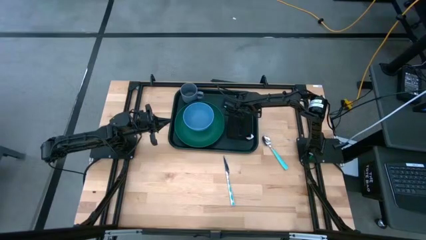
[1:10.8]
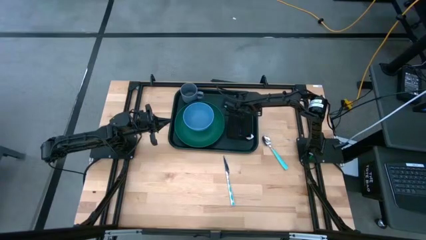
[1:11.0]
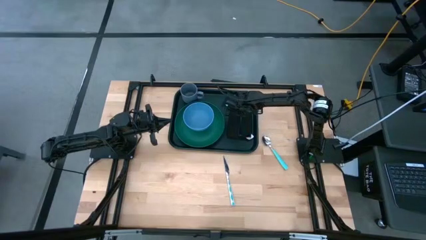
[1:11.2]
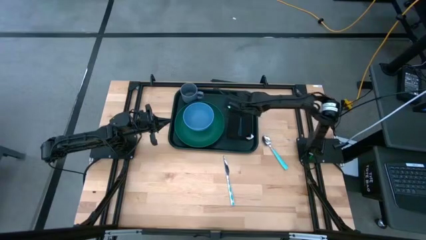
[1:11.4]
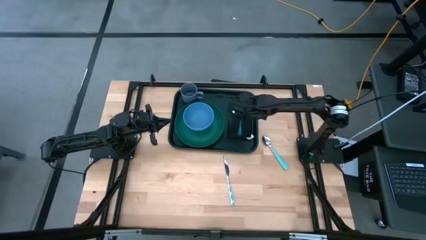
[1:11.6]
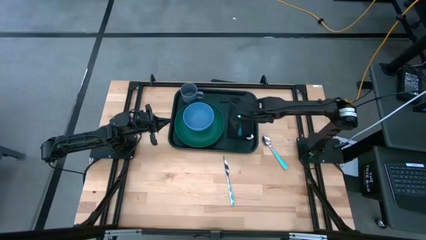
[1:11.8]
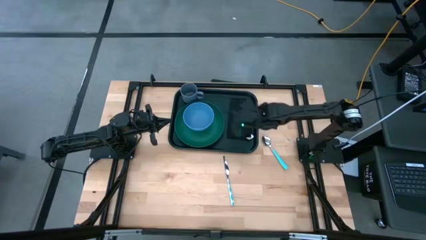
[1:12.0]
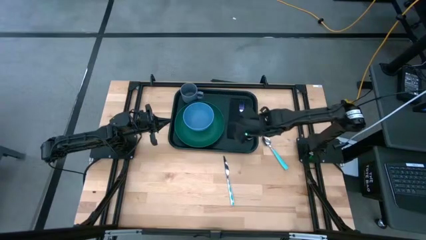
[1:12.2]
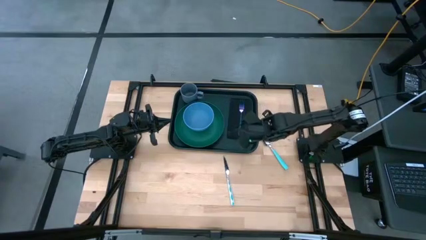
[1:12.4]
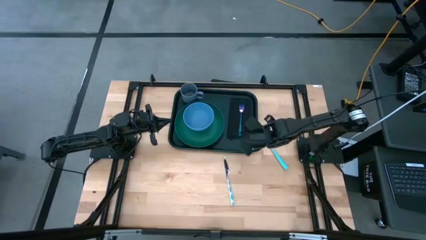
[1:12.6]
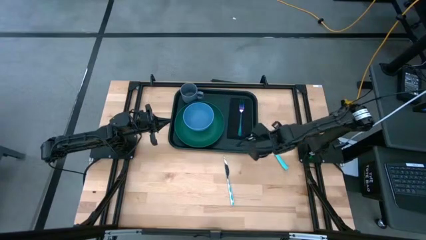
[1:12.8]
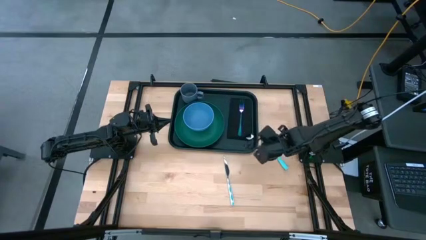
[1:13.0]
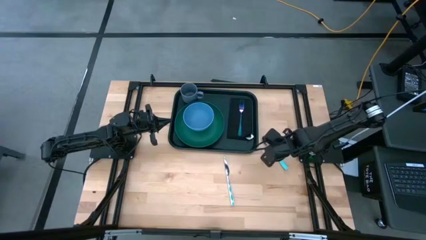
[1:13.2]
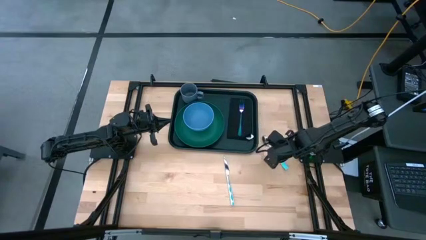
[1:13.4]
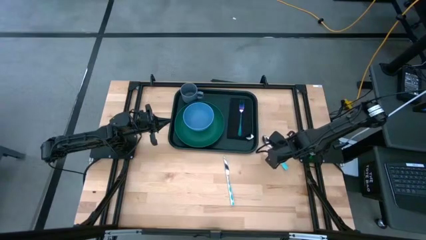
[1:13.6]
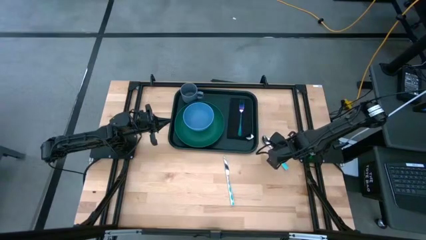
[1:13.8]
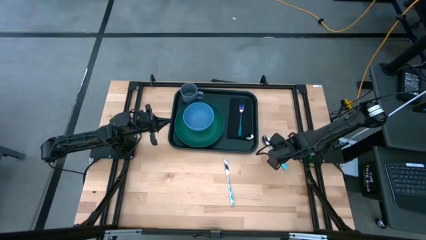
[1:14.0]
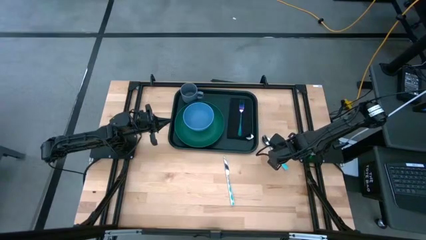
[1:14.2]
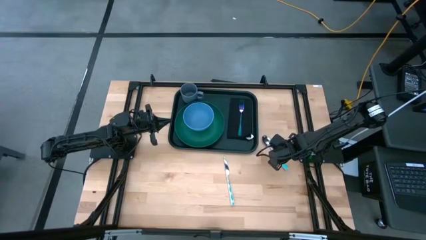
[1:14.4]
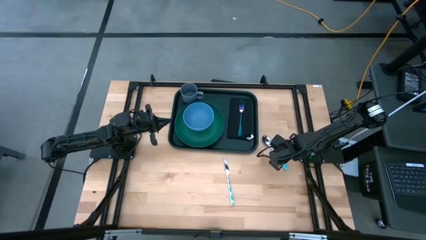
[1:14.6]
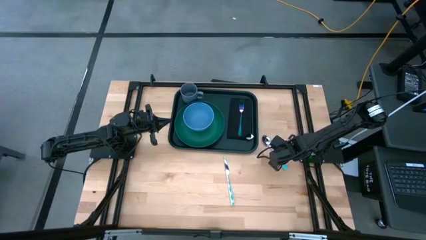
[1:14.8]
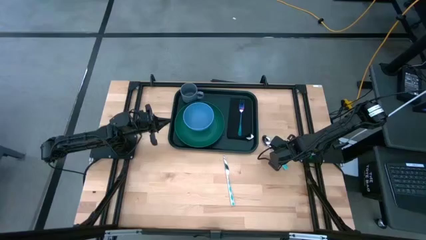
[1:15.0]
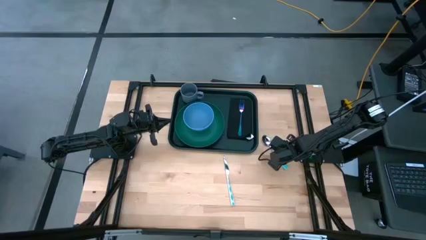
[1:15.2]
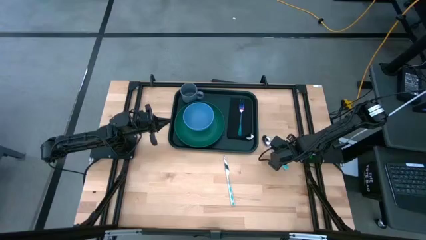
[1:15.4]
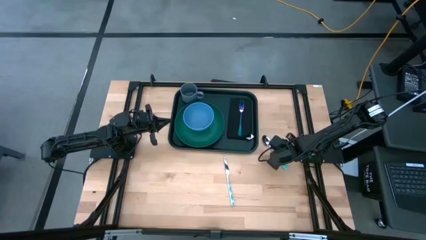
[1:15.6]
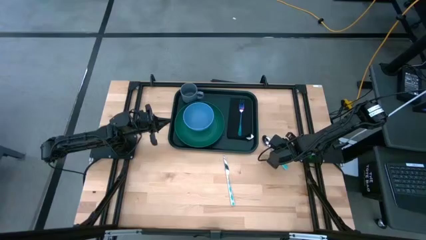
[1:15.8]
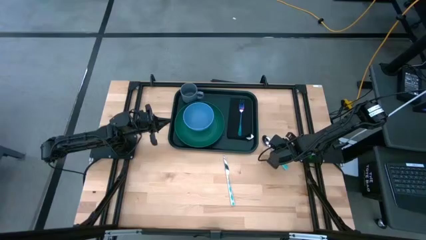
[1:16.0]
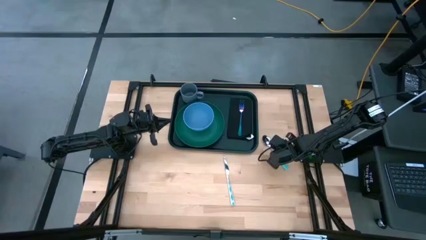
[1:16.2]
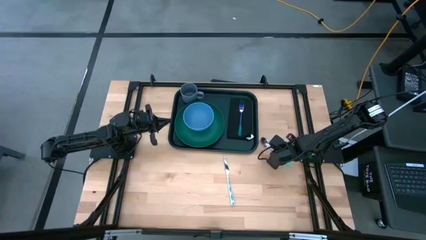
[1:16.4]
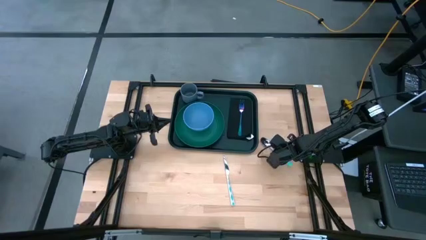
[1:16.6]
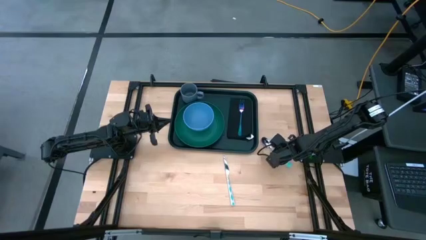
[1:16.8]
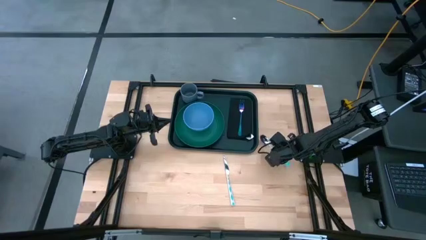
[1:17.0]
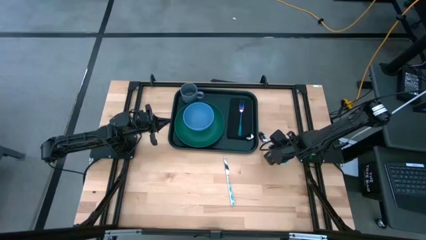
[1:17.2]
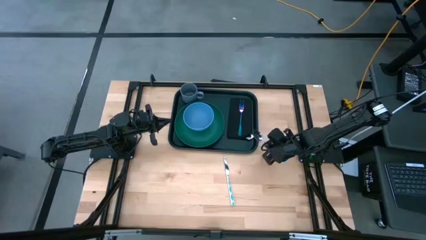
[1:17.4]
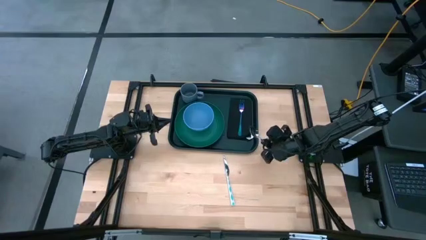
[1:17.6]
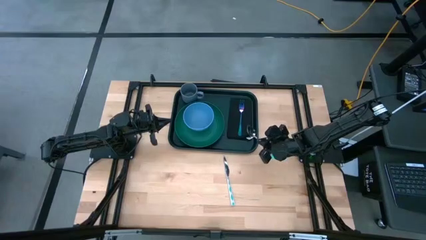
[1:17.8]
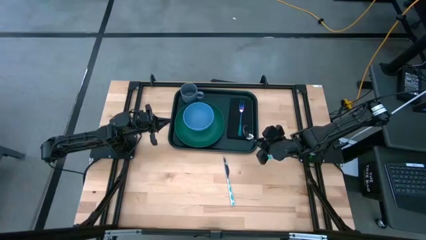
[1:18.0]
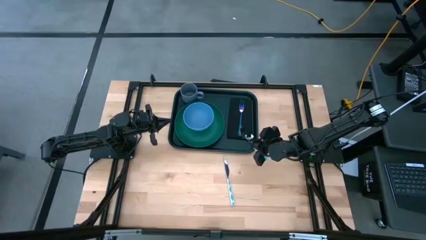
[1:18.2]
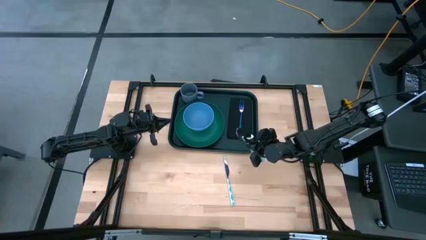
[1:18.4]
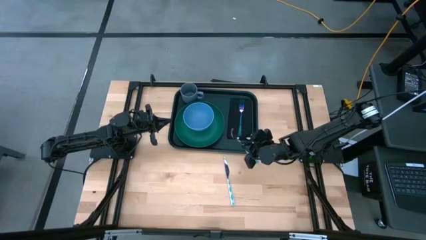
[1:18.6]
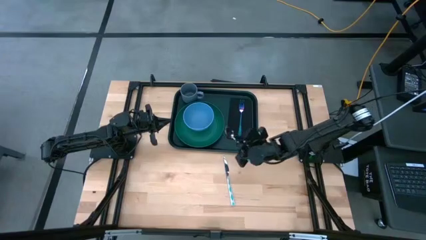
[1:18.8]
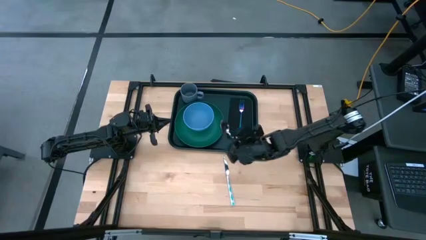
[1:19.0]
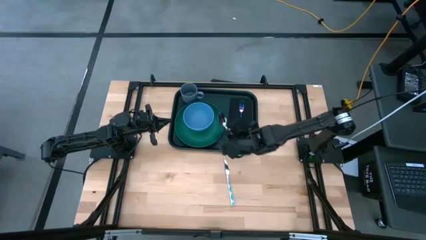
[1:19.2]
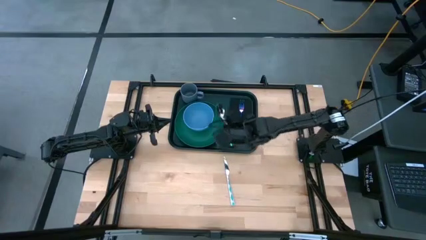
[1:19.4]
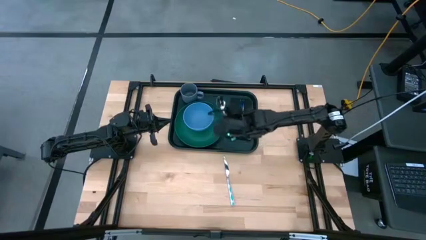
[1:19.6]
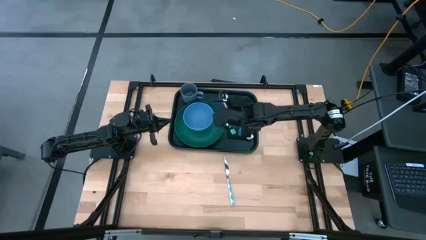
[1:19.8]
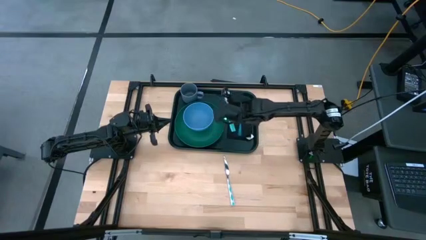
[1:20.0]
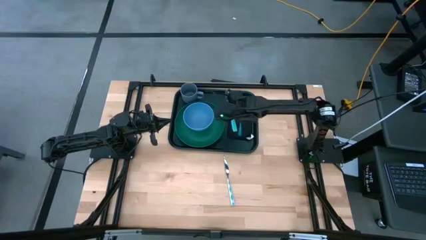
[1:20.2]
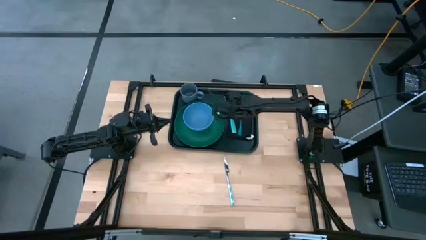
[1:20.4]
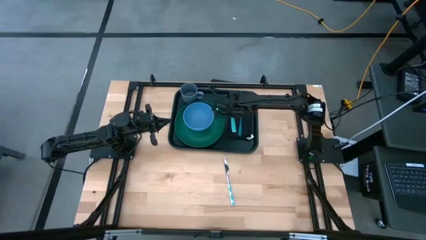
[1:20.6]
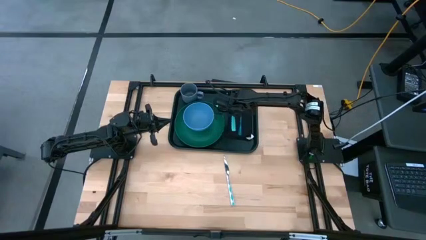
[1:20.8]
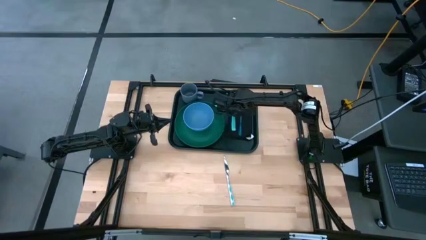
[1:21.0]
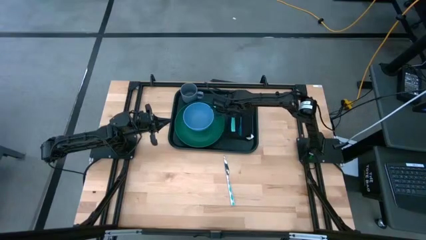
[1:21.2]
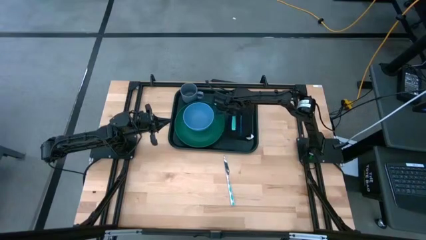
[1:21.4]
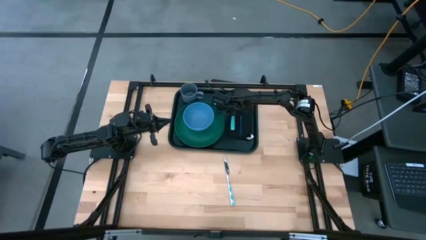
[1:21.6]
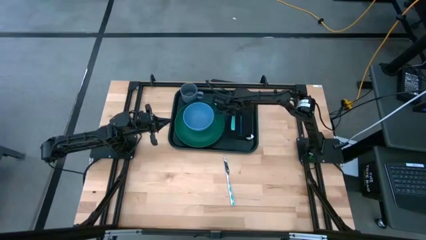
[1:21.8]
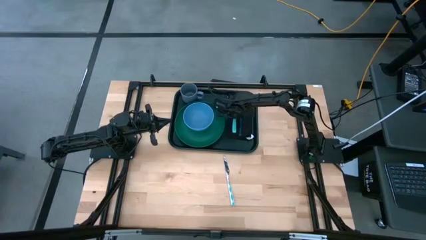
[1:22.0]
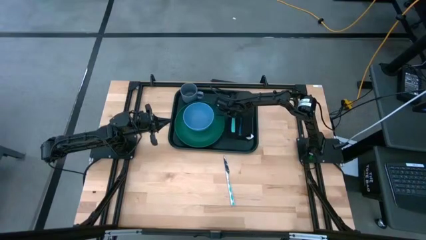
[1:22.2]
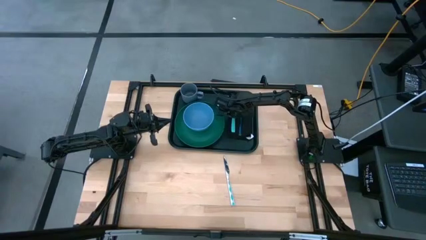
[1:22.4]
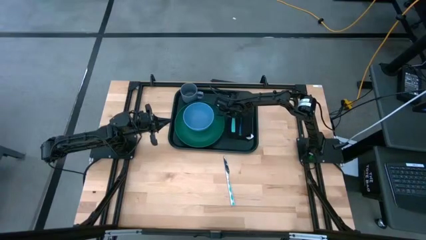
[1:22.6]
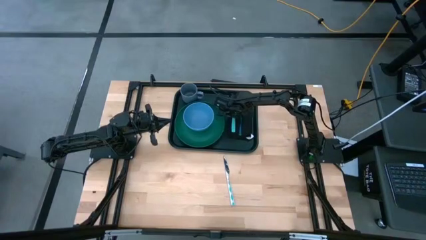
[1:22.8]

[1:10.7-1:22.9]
Task: Set up tray
Put the blue spoon on the black napkin to the left of the blue fork
